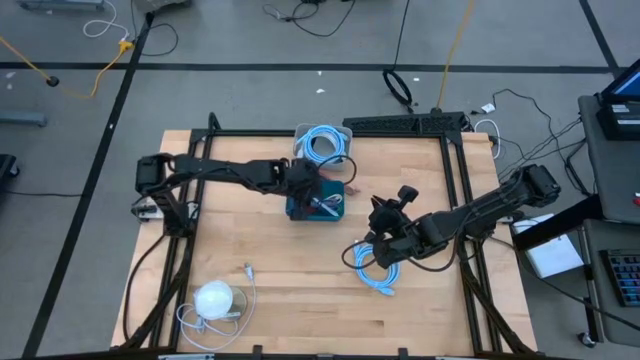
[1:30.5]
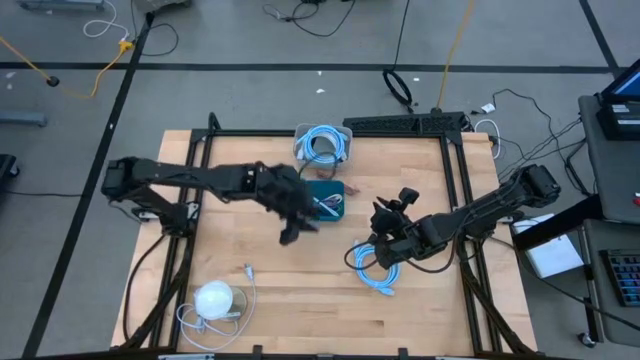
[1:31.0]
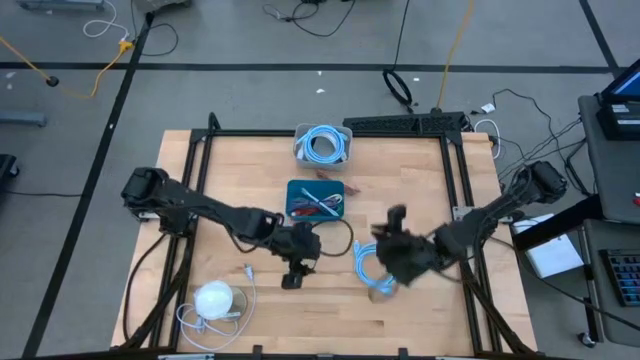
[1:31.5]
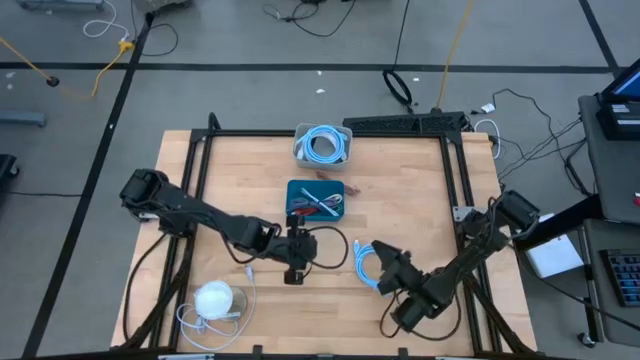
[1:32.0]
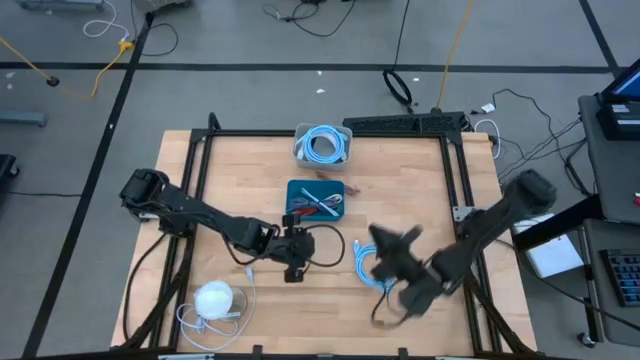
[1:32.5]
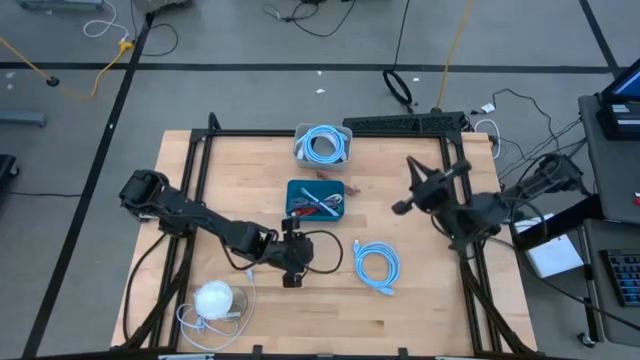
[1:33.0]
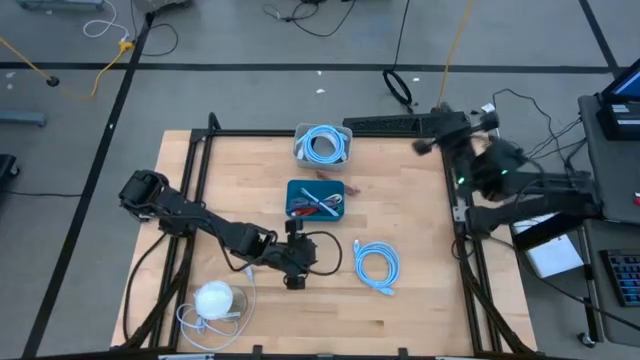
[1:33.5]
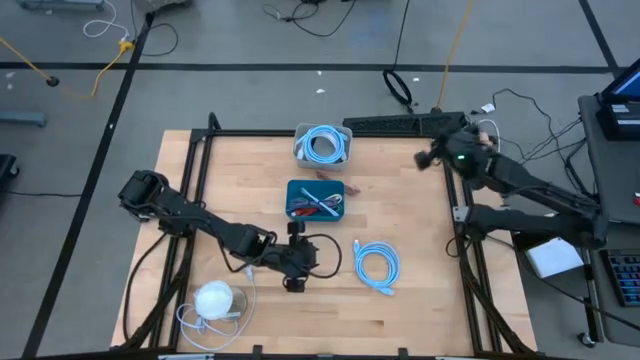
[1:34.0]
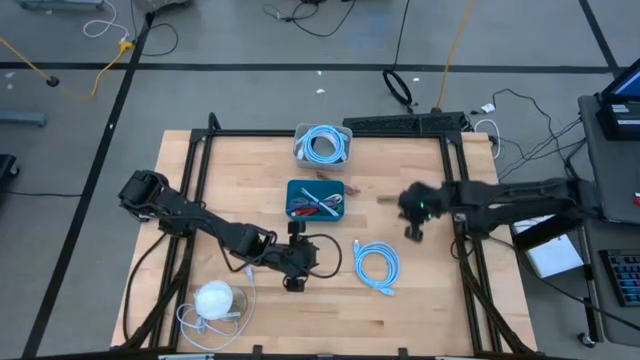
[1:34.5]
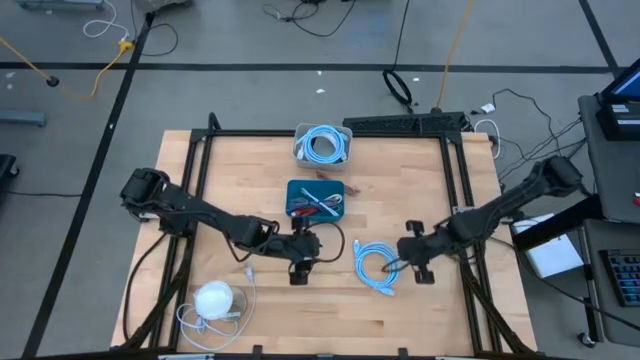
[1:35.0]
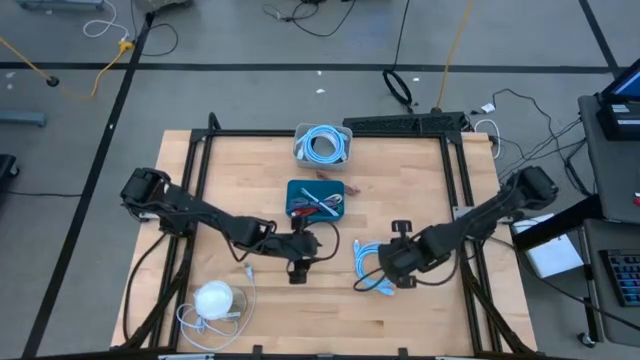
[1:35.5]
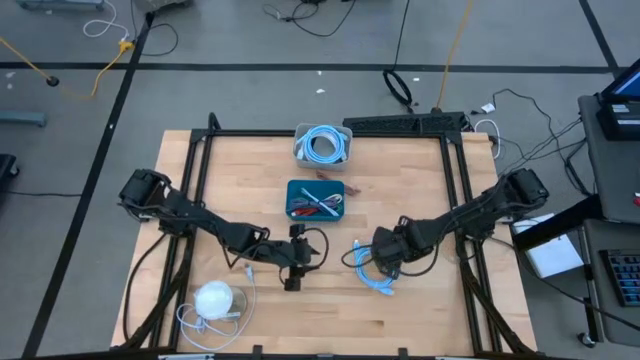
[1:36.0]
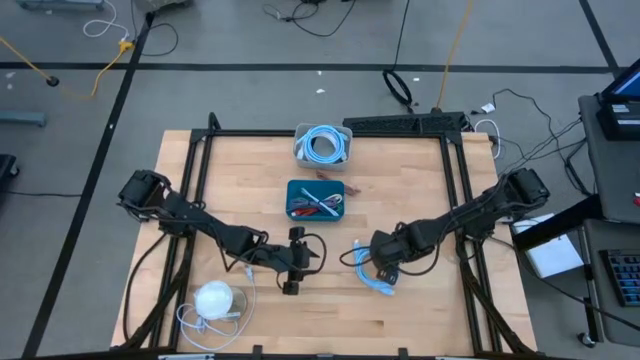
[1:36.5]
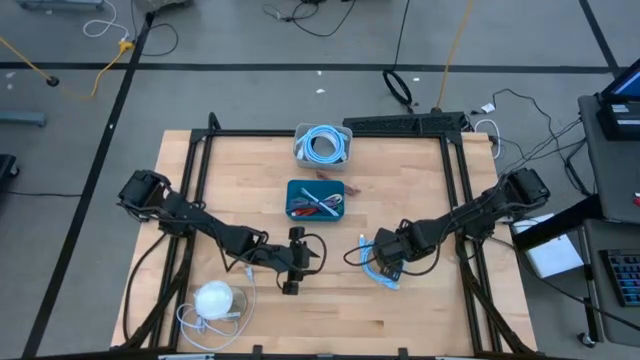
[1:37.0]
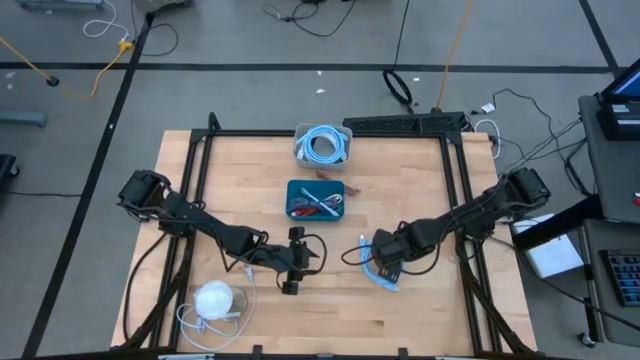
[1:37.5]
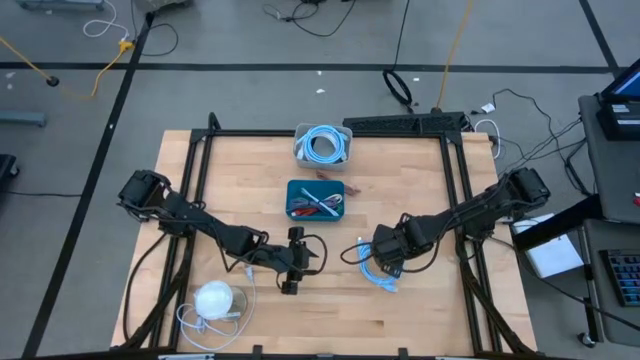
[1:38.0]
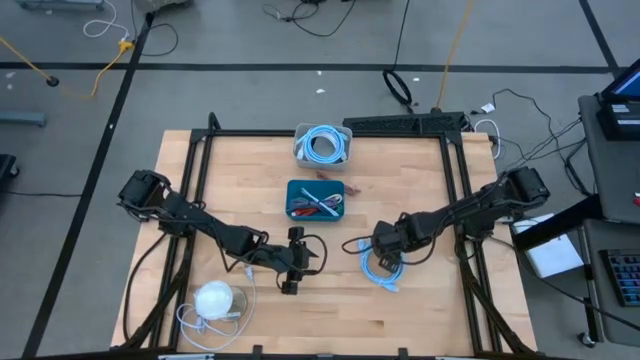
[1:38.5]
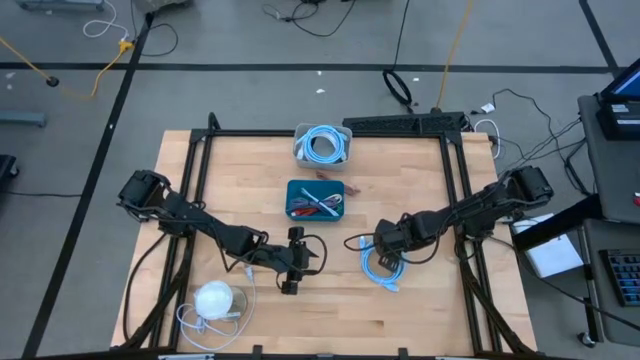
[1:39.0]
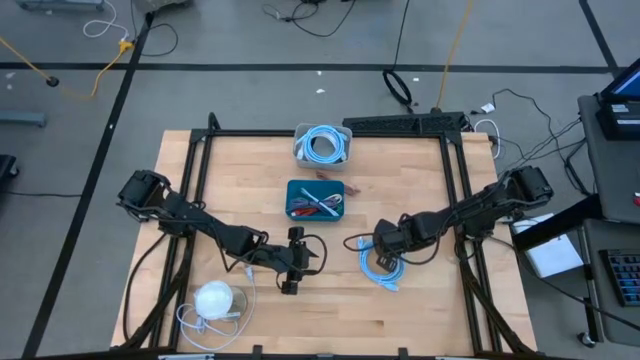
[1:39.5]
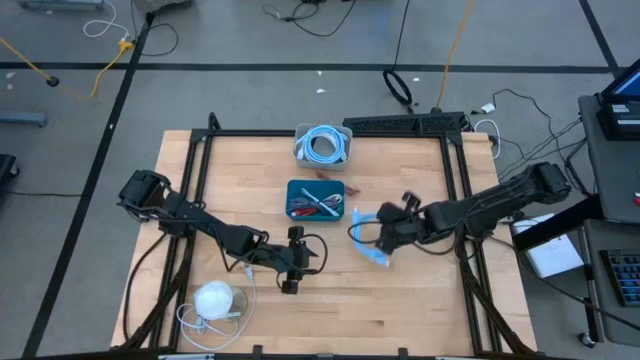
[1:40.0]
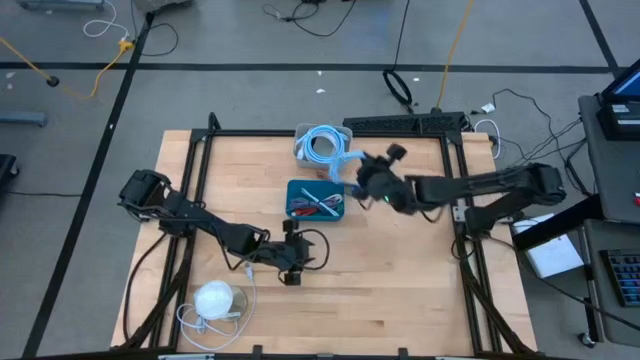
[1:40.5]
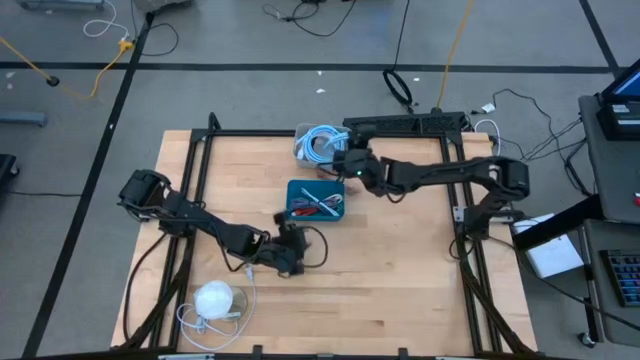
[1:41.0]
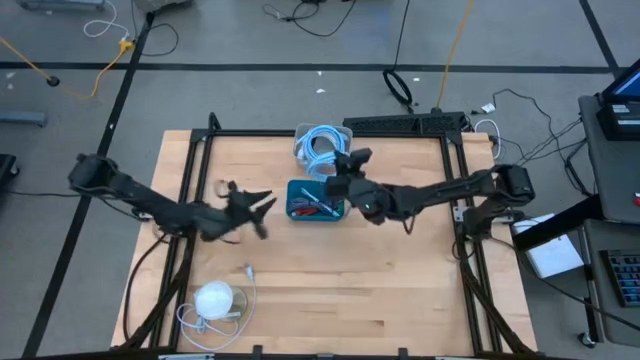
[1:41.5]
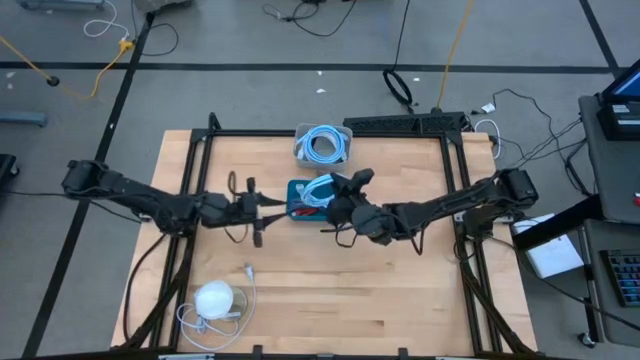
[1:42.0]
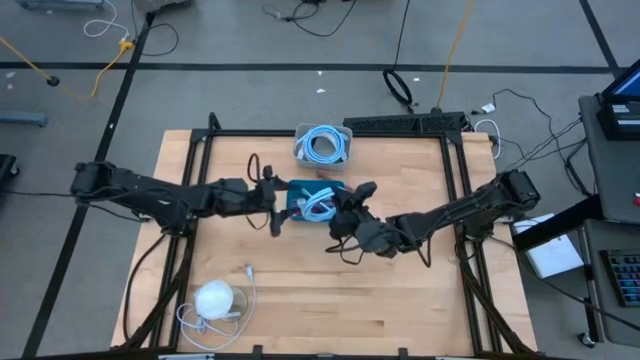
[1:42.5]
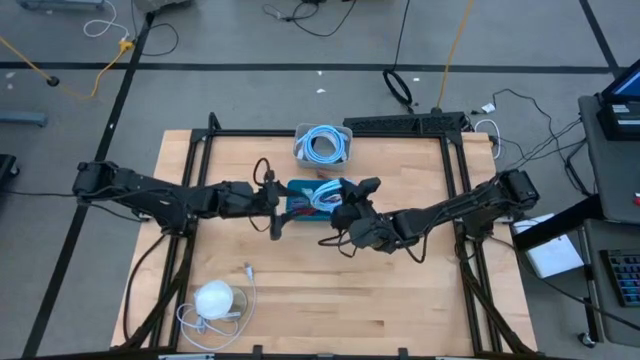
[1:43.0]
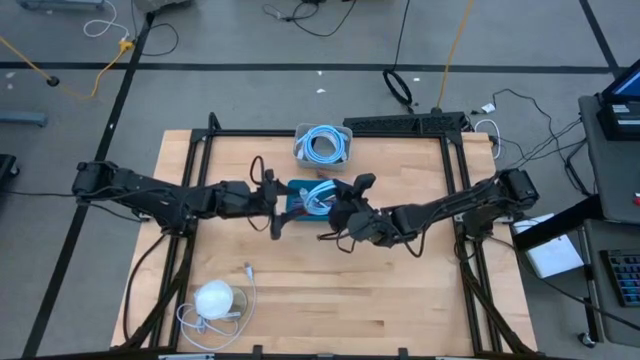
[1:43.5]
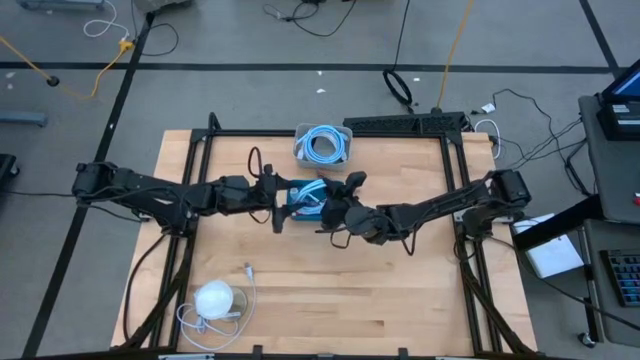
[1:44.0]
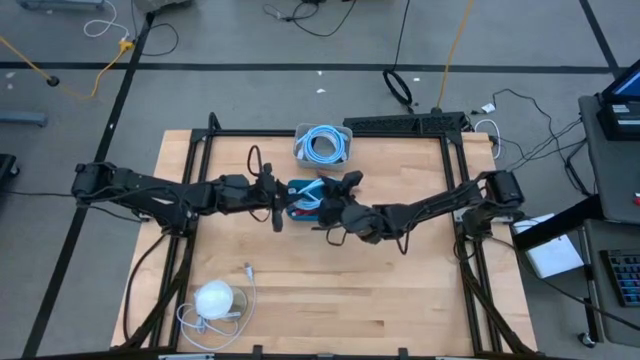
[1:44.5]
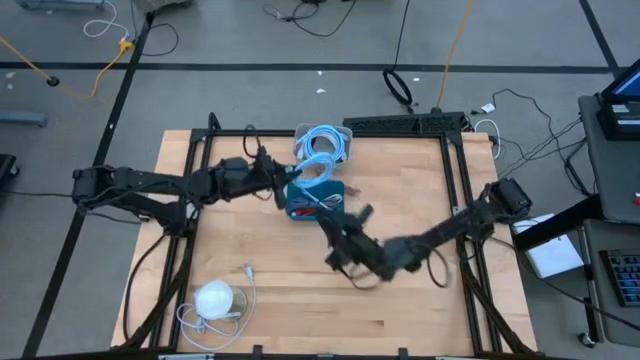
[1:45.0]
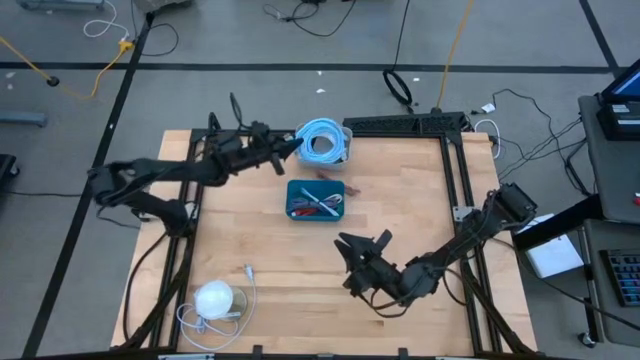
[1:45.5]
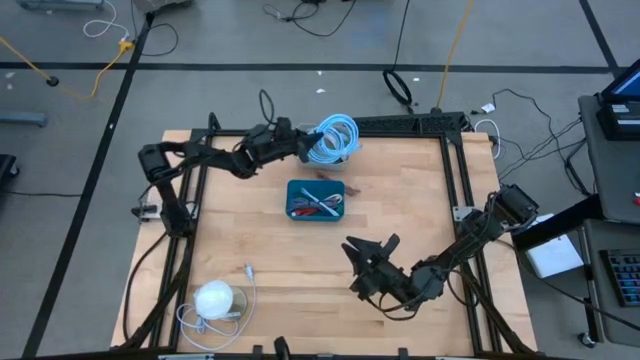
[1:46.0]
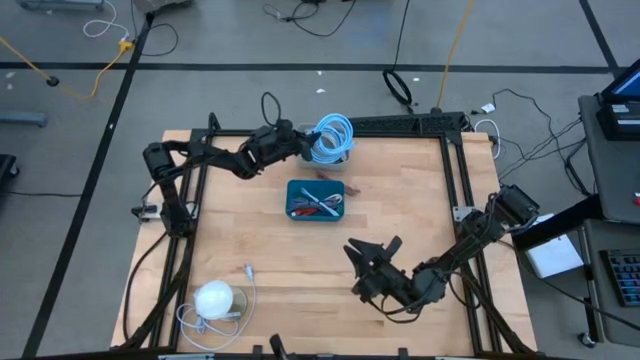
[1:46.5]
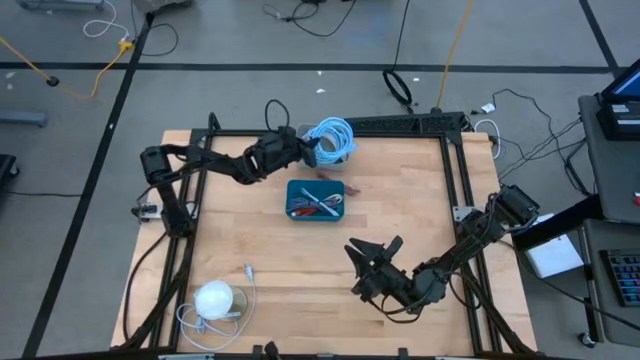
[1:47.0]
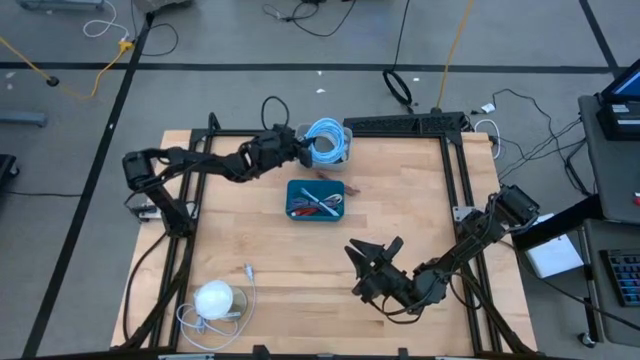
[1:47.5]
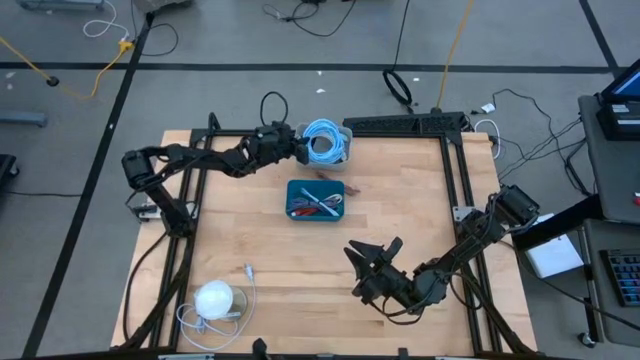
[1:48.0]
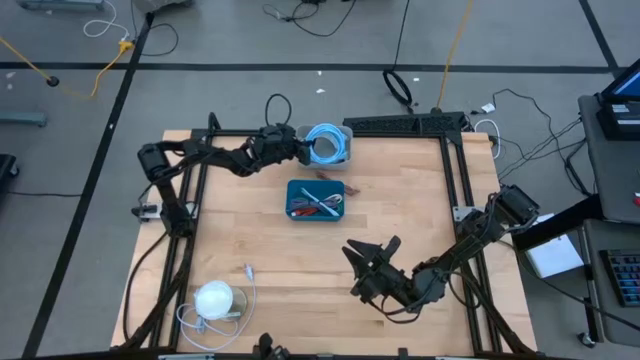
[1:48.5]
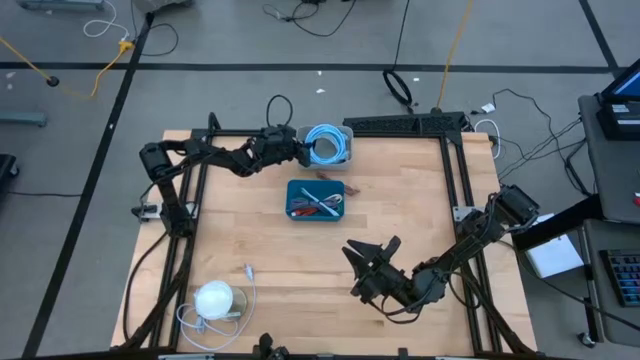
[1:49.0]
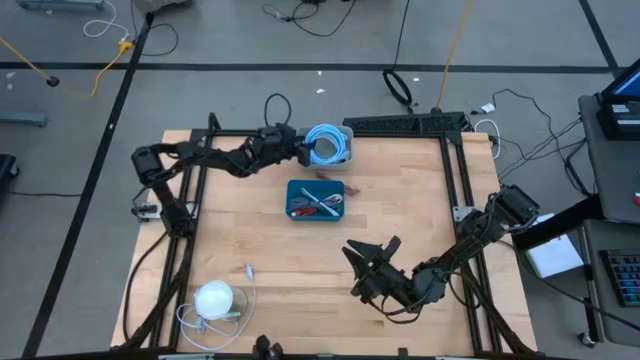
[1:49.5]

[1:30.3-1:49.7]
Task: Pick & Place USB Port
Put the blue HDMI cable into the gray bin

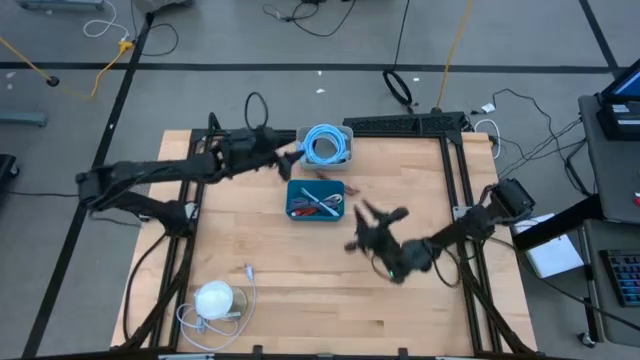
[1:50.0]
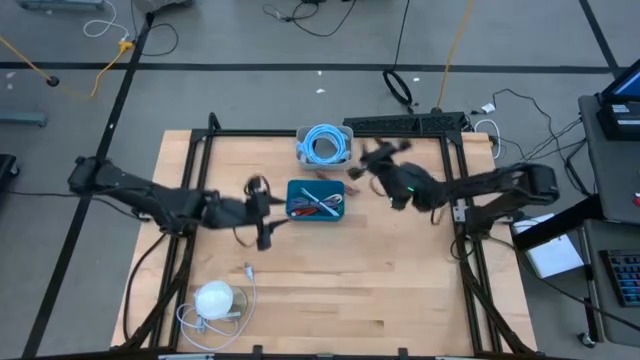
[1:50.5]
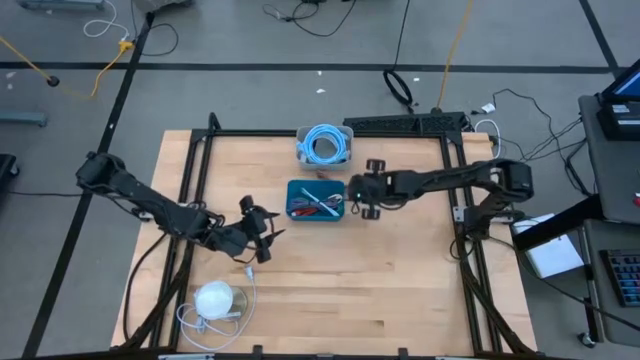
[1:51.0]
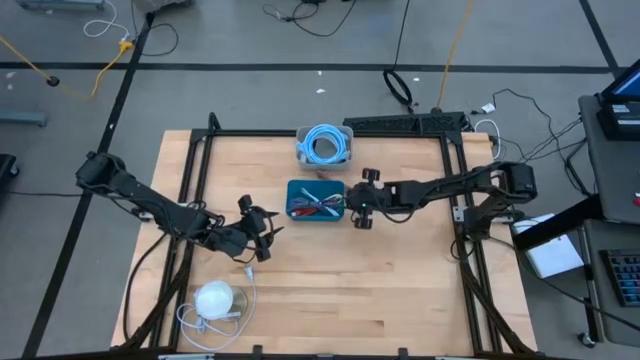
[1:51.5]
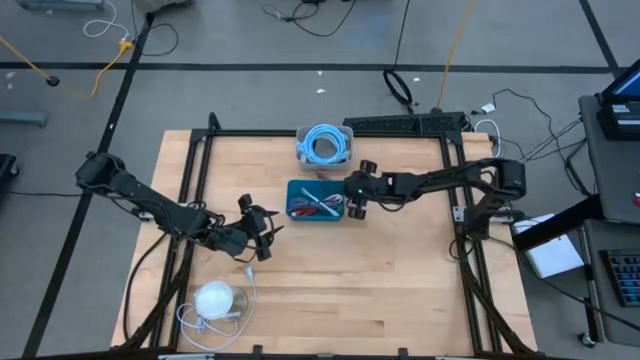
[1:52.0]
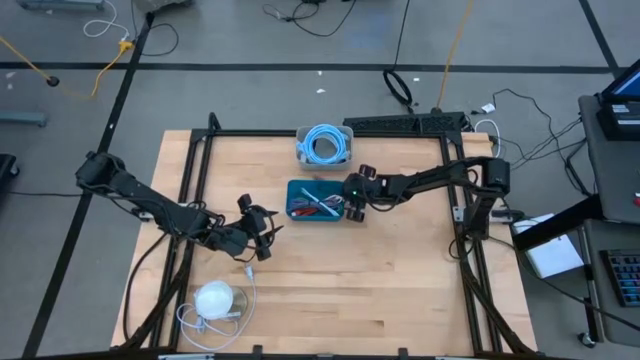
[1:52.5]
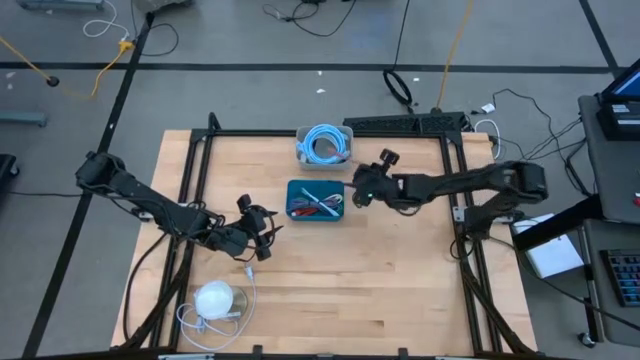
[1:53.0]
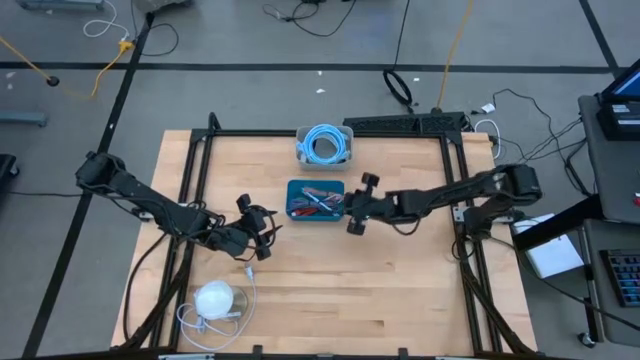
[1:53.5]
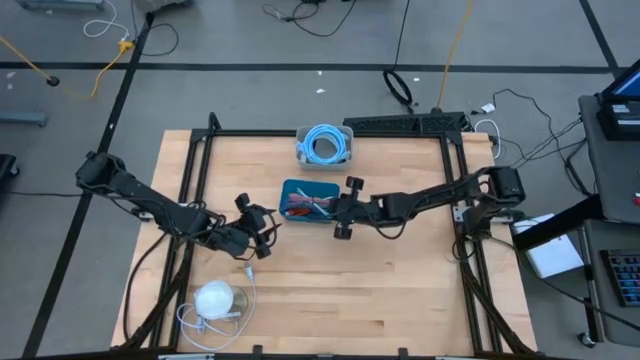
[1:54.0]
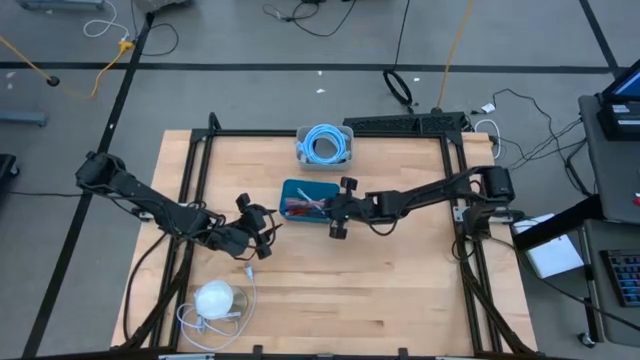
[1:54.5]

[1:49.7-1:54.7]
Put the pink charger cable into the blue bin
